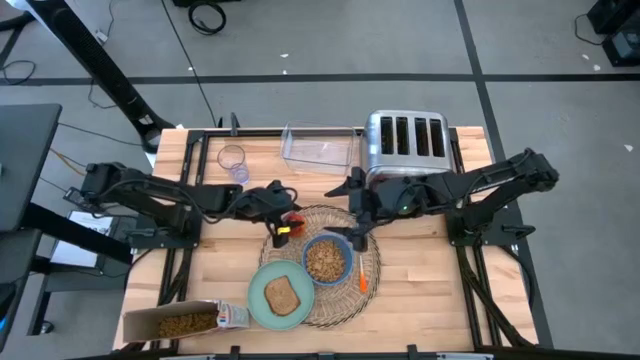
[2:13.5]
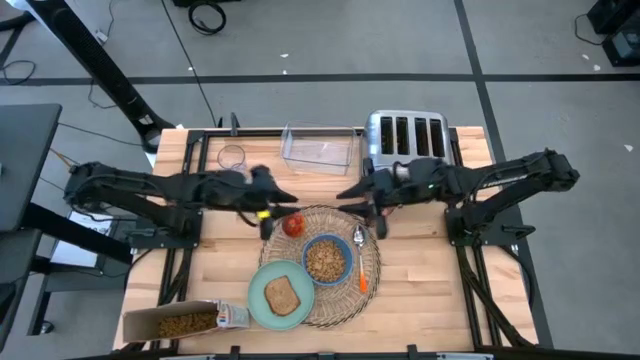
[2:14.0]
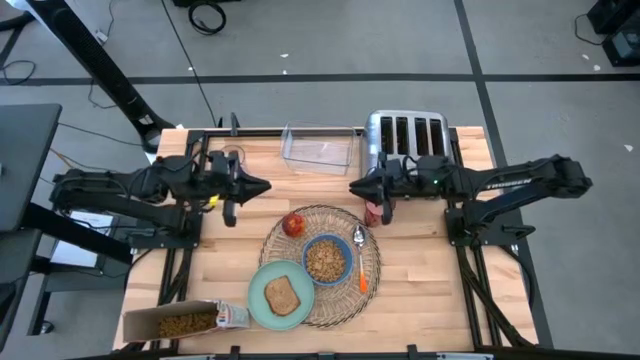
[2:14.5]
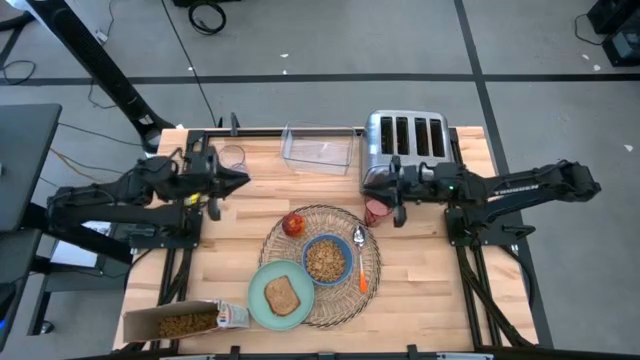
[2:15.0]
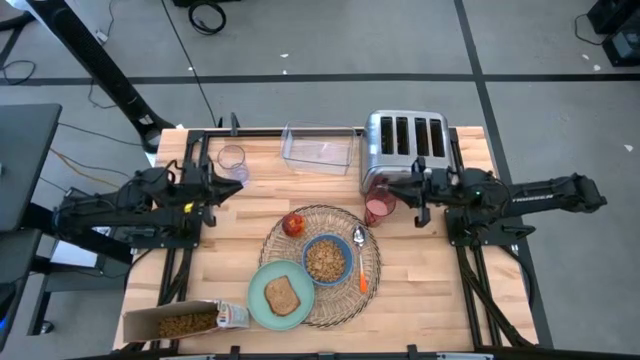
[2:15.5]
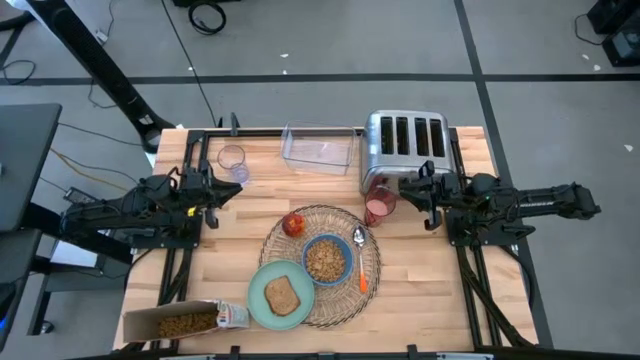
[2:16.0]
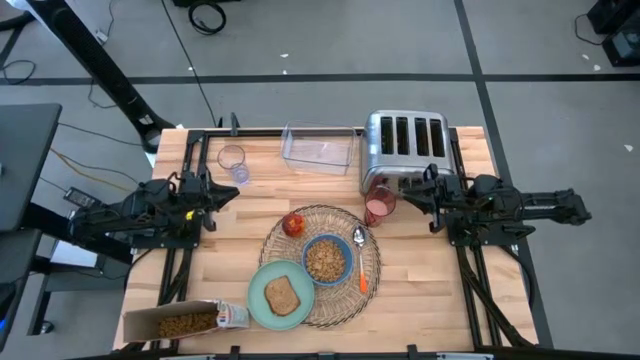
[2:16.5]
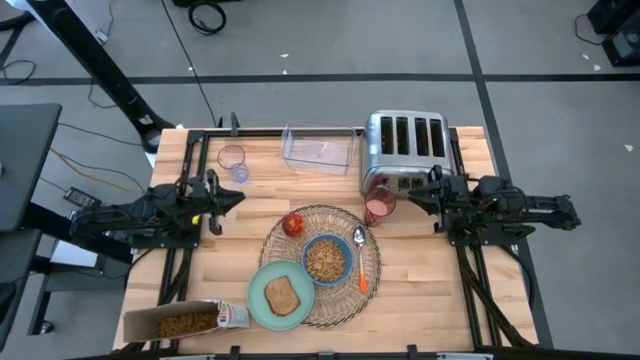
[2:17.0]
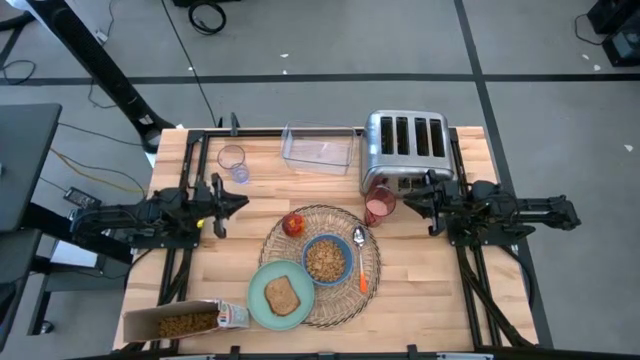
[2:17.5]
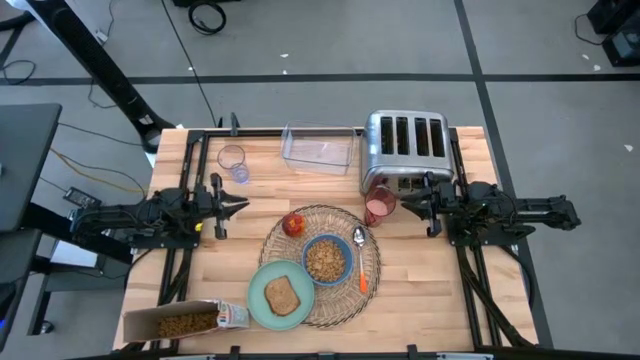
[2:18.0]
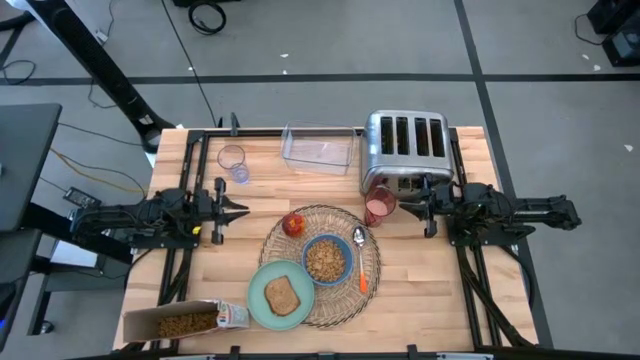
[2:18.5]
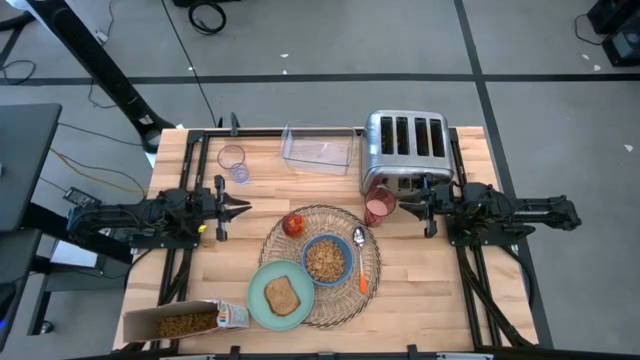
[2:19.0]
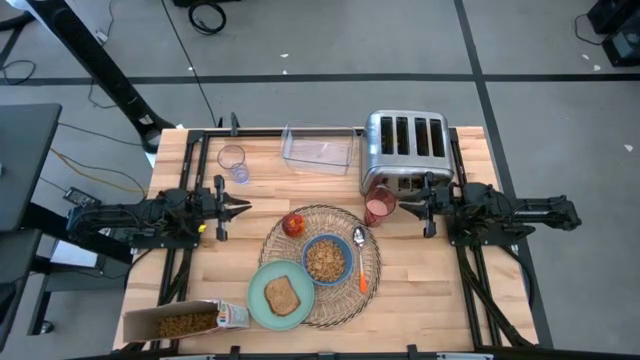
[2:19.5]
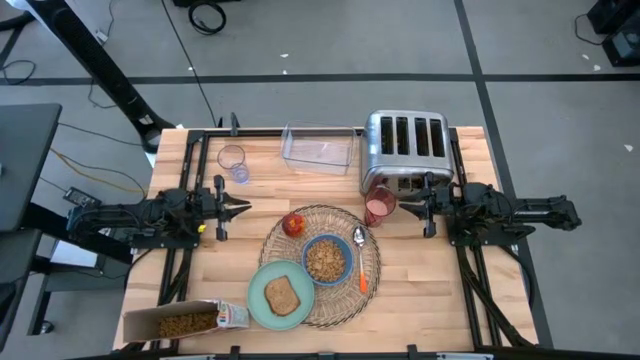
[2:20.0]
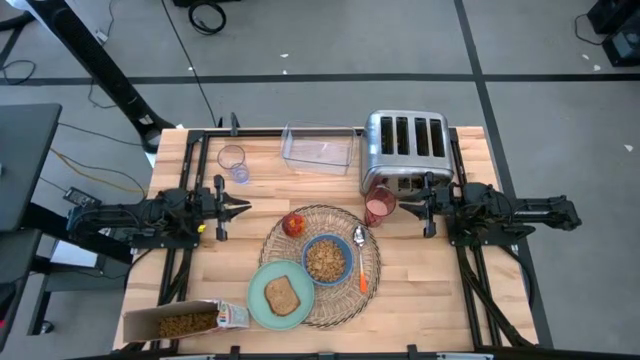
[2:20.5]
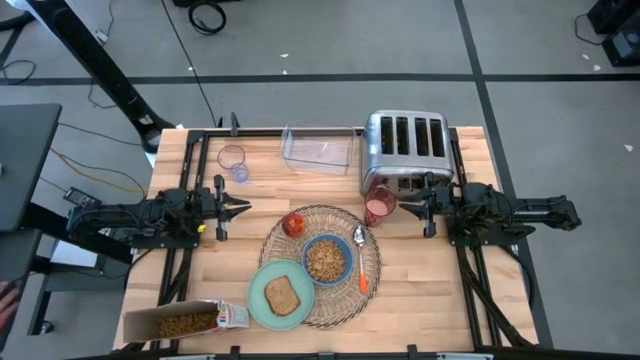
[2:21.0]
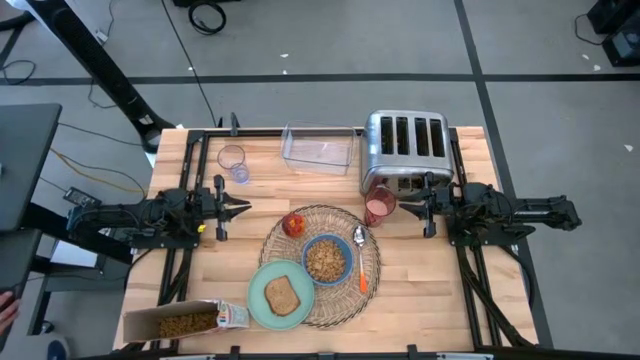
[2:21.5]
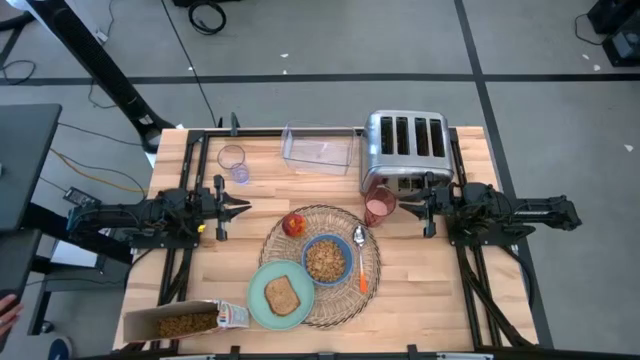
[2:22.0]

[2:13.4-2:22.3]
Task: Arrange a breakfast setting
Return to Home Position

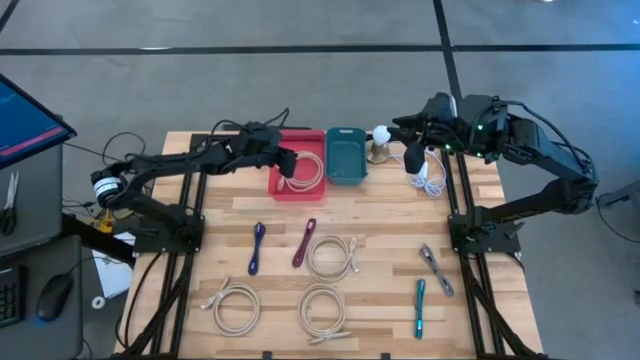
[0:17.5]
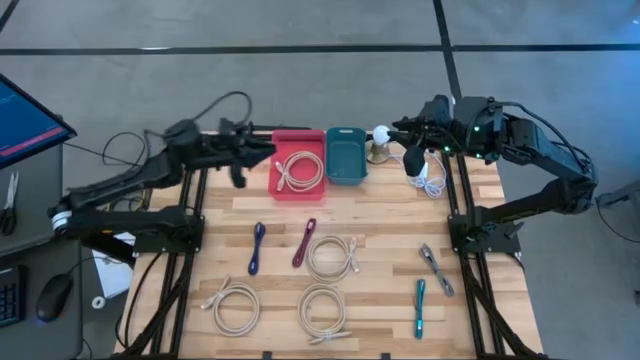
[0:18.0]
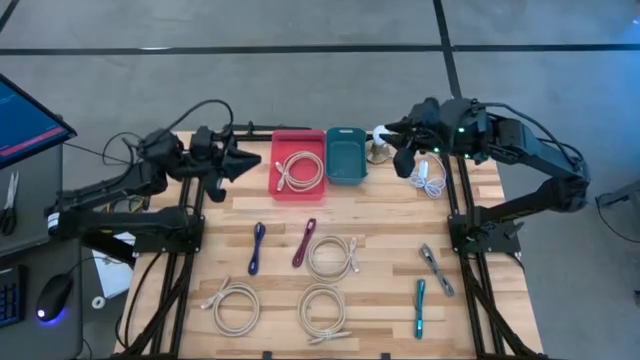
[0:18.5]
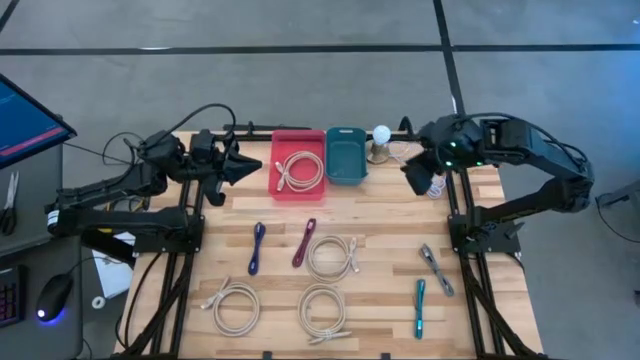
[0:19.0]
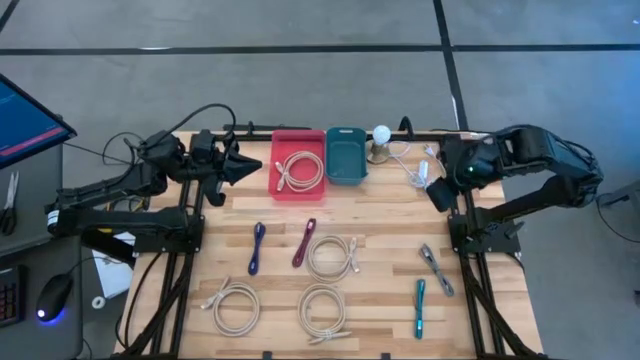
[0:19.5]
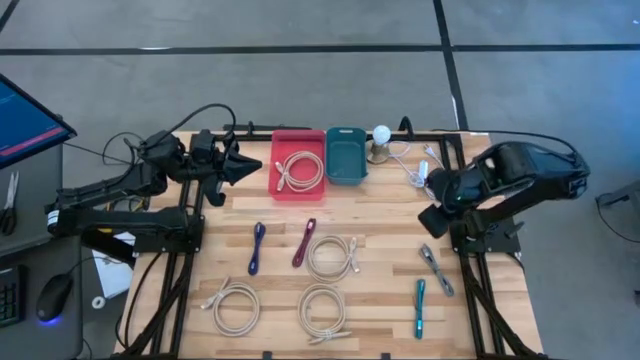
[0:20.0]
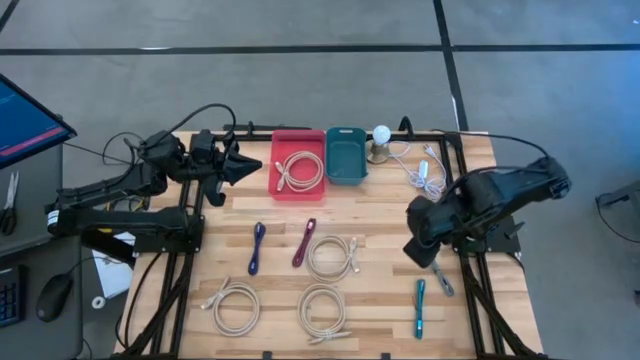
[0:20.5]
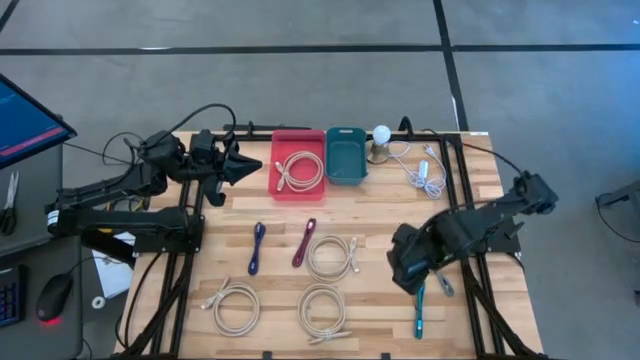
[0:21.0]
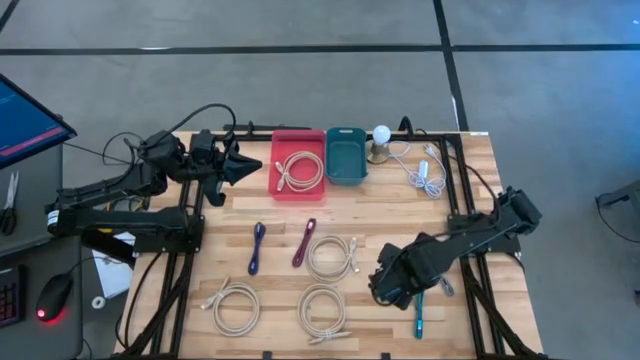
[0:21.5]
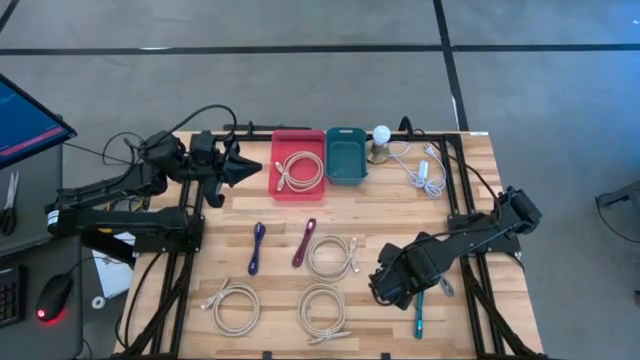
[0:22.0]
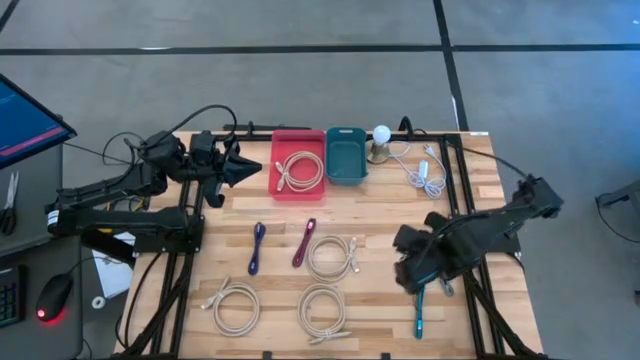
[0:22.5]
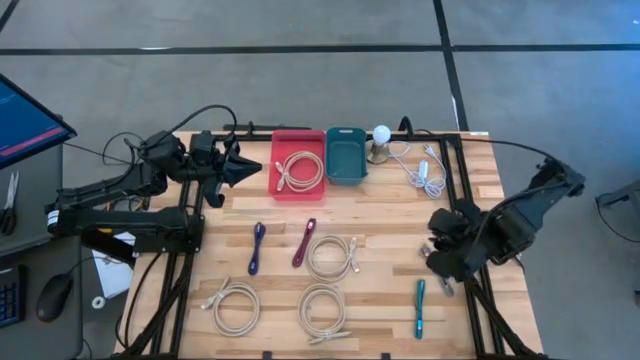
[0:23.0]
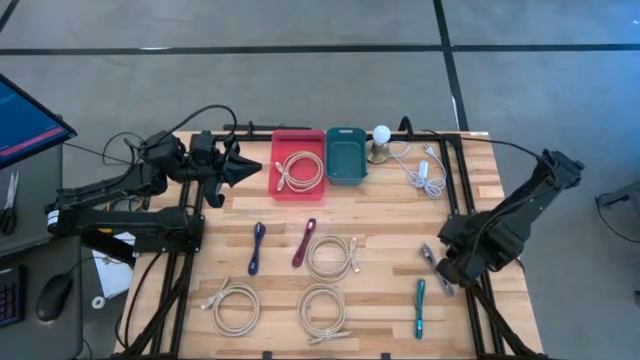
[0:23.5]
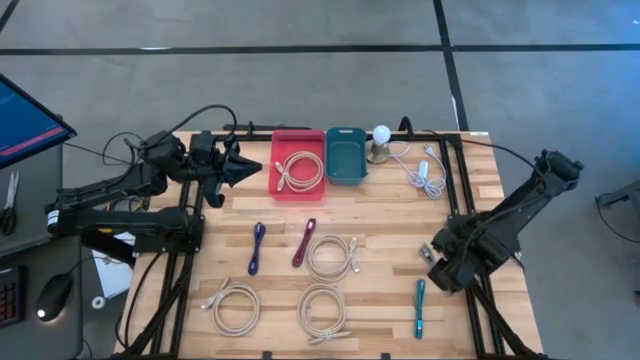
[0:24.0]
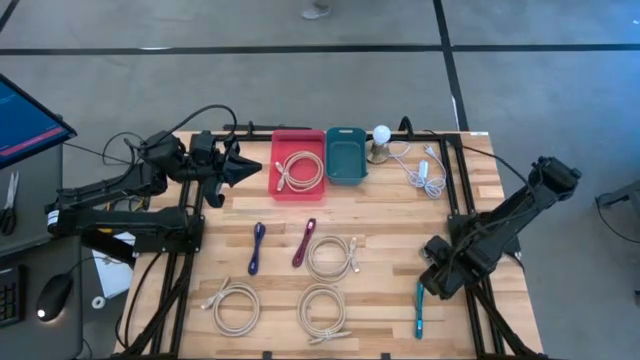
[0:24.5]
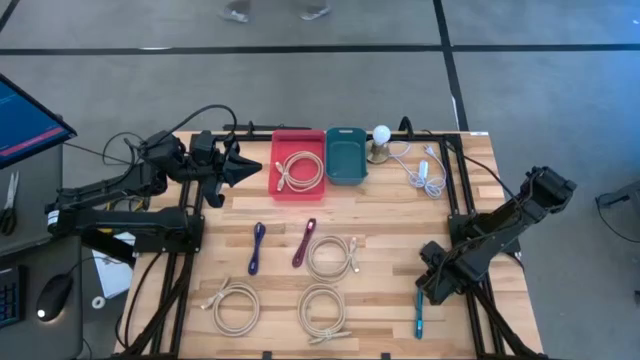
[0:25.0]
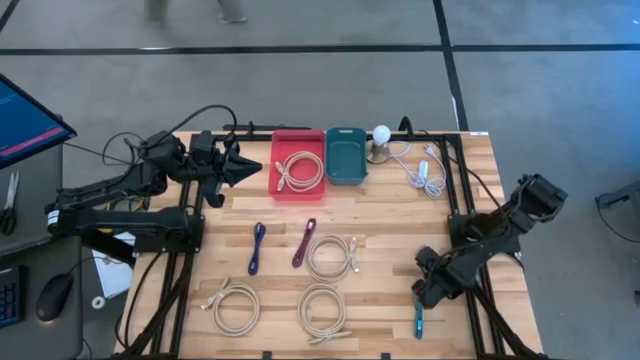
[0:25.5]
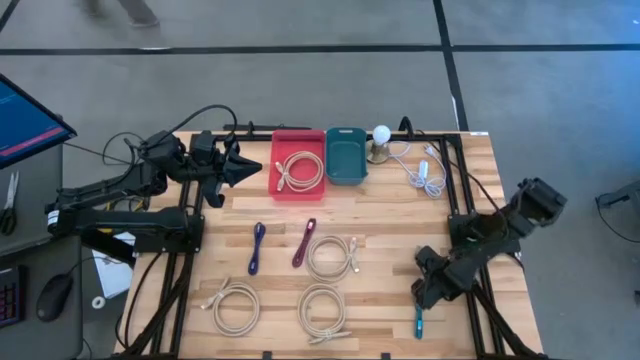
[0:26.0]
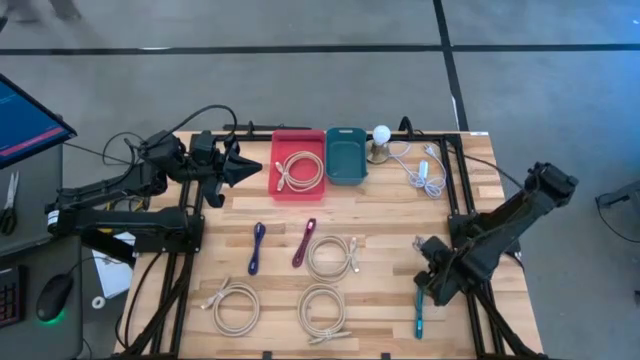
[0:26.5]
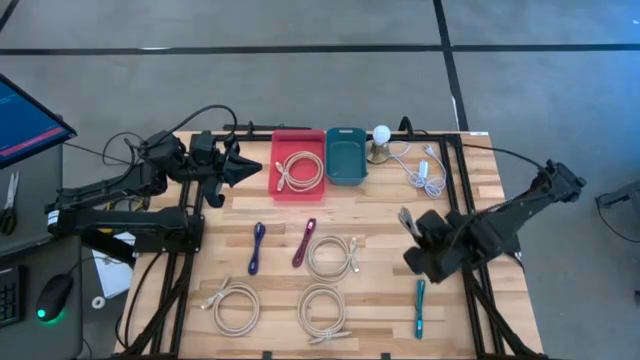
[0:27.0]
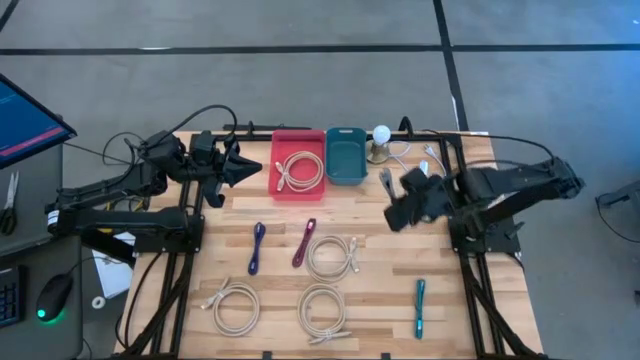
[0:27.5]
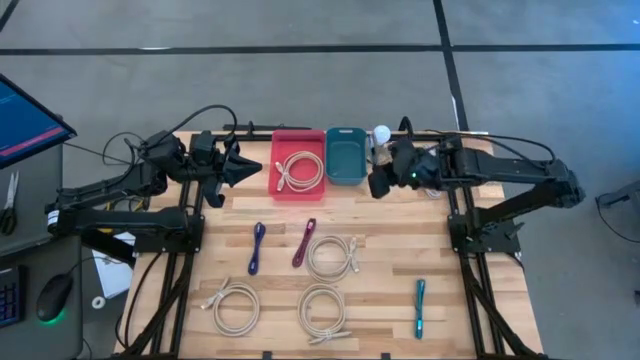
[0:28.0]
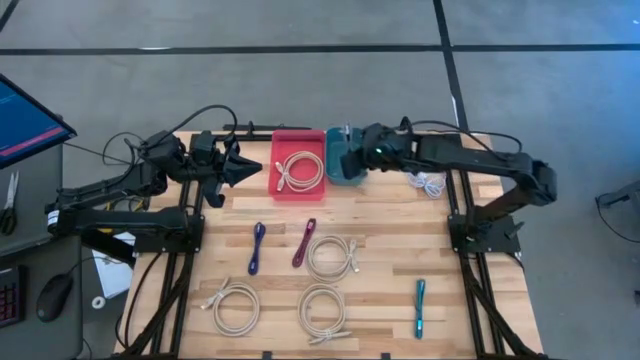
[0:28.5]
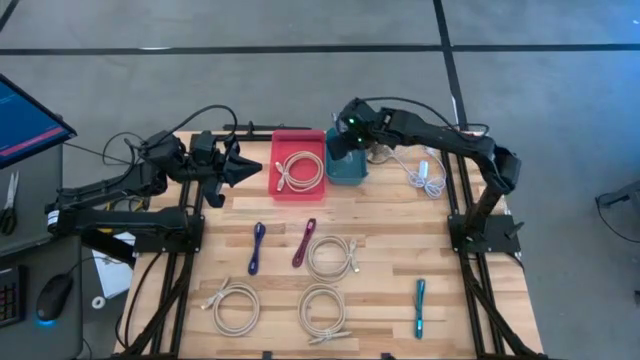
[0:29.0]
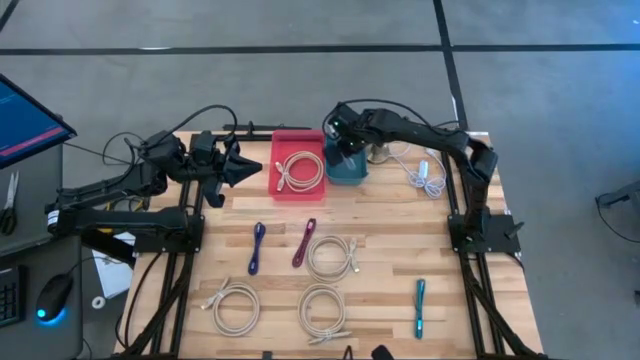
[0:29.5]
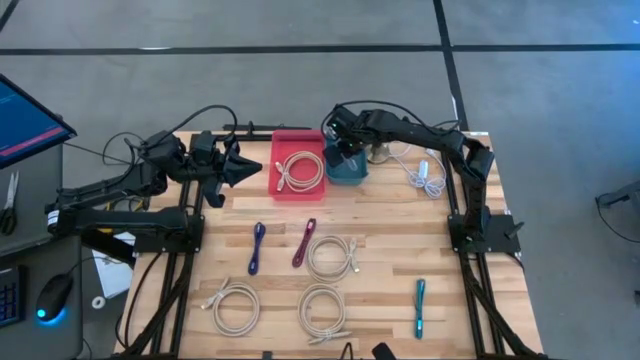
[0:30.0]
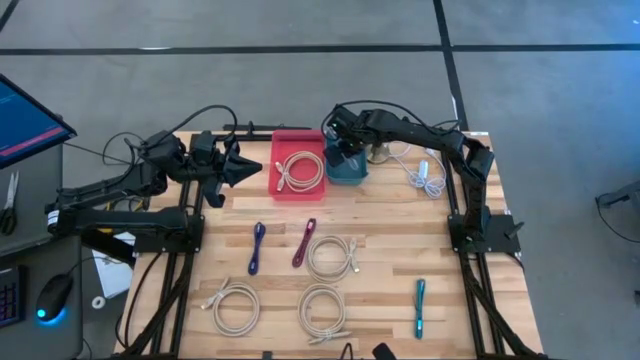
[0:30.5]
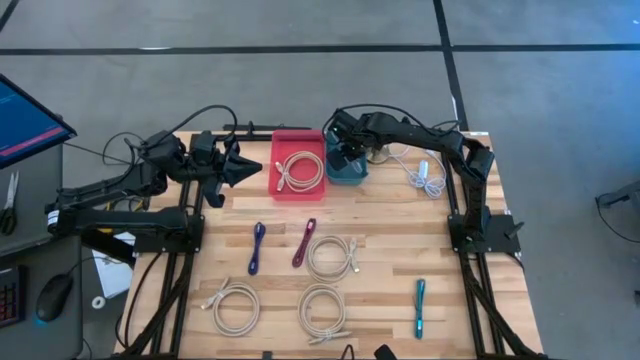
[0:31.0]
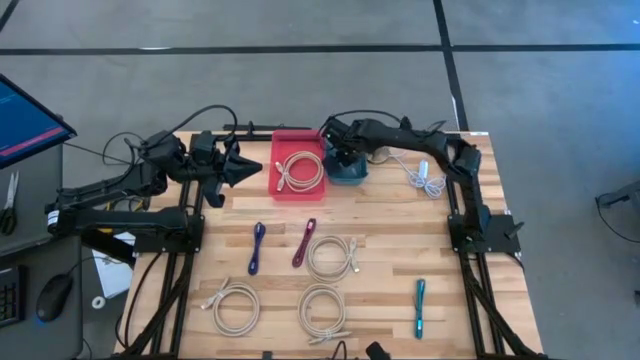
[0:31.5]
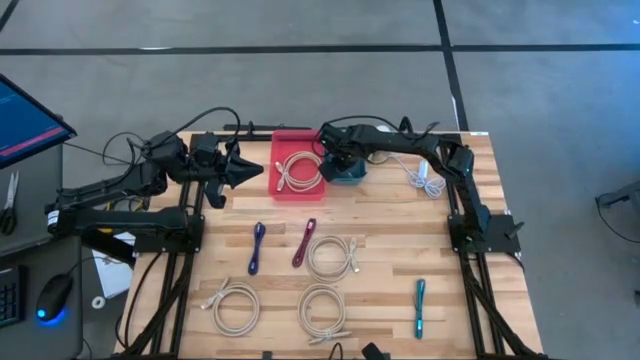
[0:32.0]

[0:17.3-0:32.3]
Task: Pick & Place USB Port
Put the white charger cable into the blue bin
